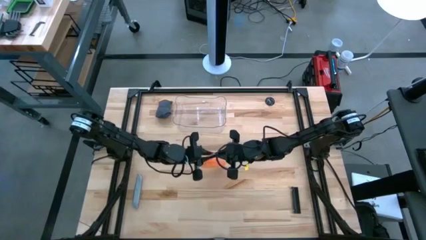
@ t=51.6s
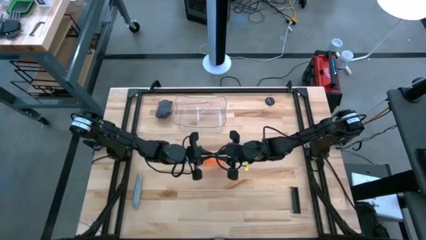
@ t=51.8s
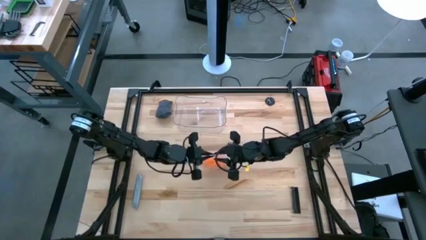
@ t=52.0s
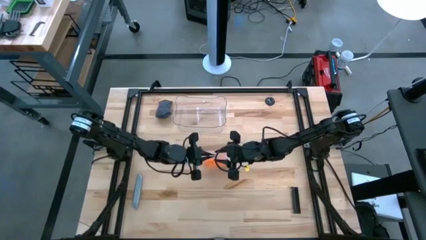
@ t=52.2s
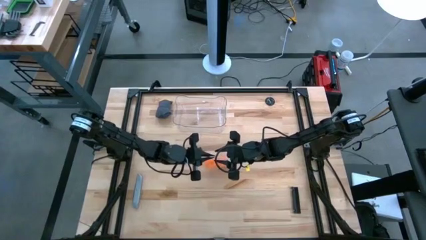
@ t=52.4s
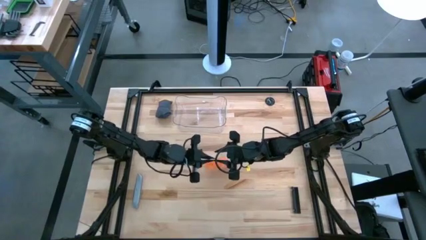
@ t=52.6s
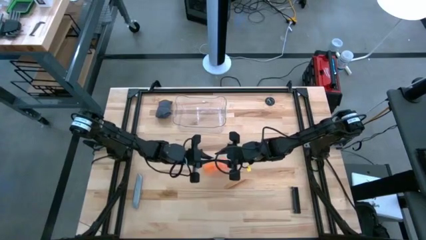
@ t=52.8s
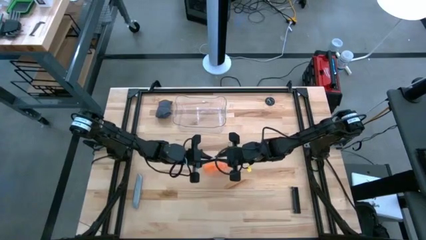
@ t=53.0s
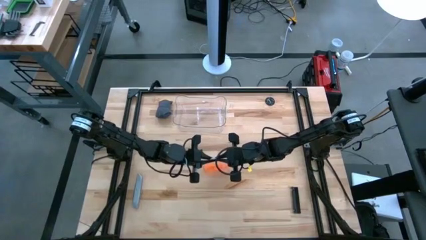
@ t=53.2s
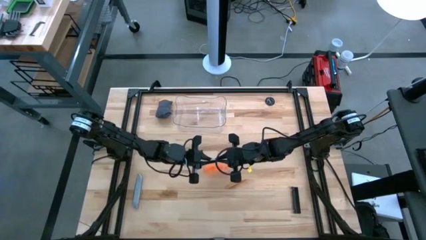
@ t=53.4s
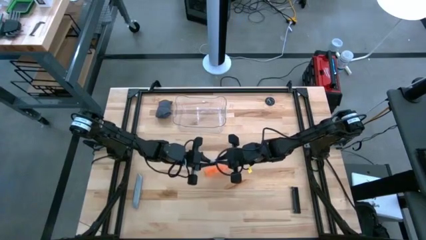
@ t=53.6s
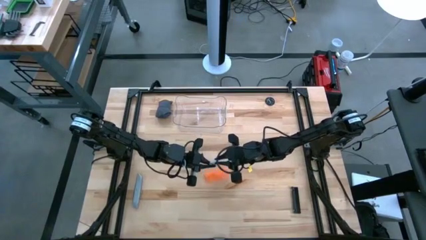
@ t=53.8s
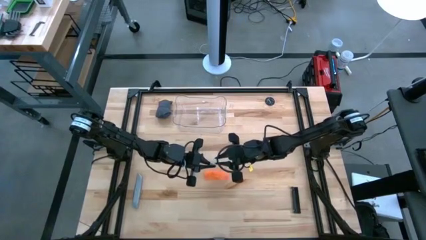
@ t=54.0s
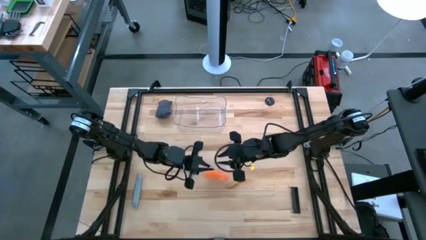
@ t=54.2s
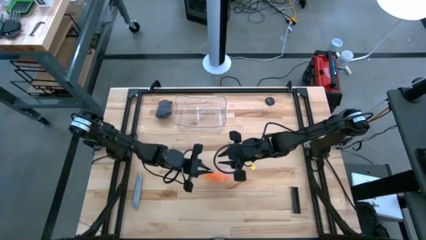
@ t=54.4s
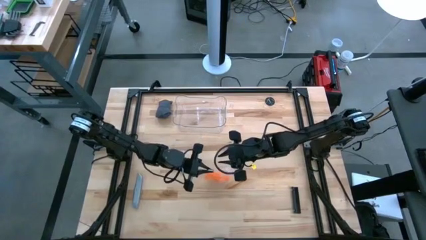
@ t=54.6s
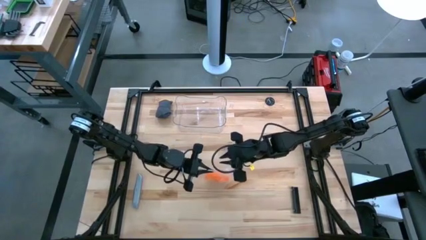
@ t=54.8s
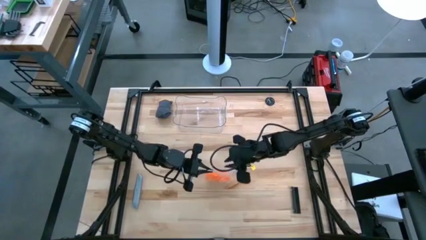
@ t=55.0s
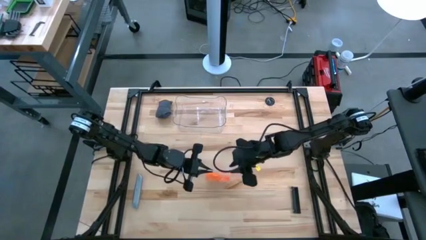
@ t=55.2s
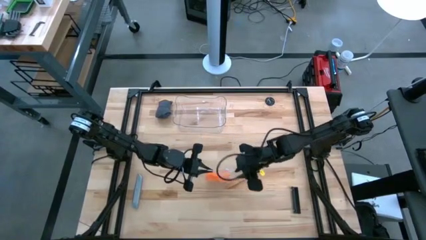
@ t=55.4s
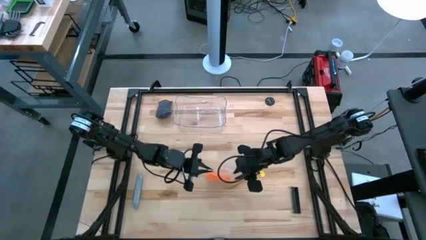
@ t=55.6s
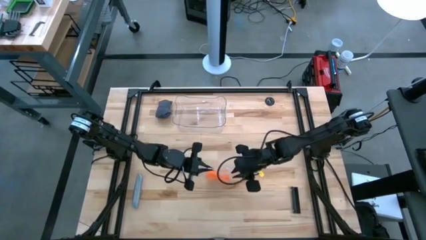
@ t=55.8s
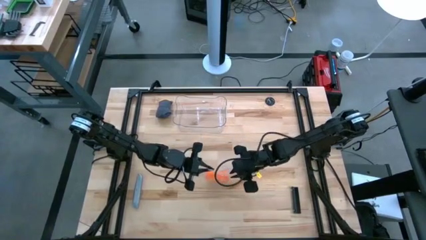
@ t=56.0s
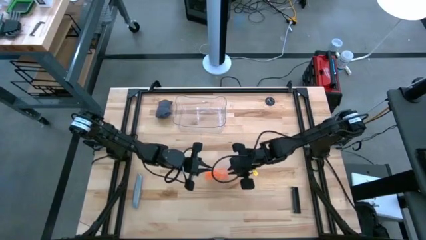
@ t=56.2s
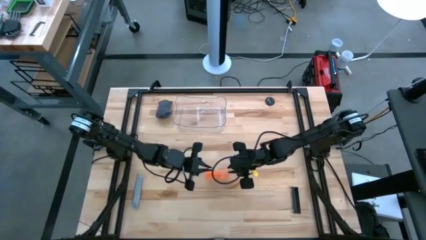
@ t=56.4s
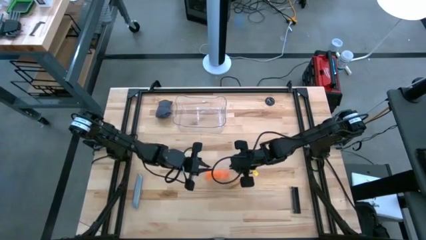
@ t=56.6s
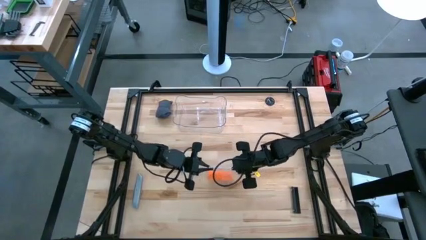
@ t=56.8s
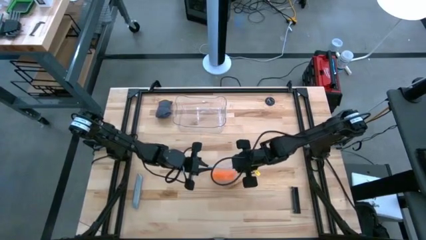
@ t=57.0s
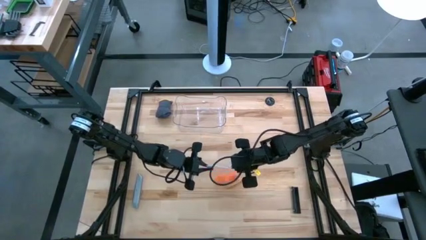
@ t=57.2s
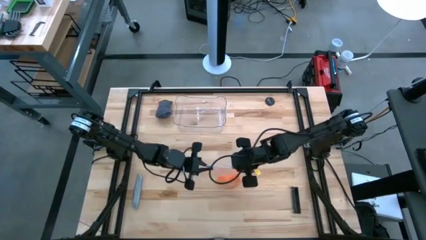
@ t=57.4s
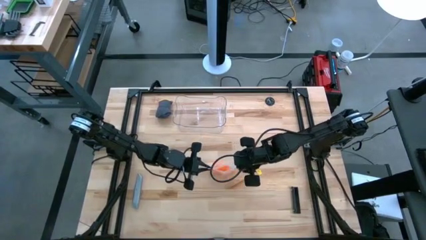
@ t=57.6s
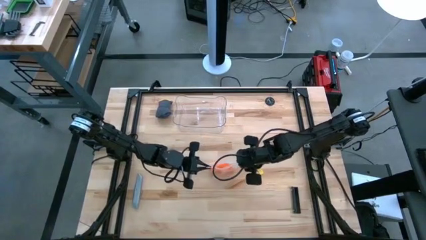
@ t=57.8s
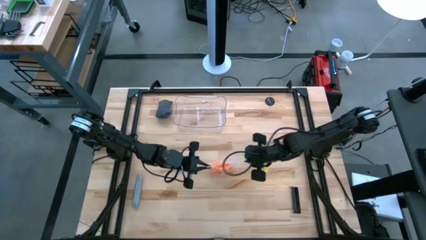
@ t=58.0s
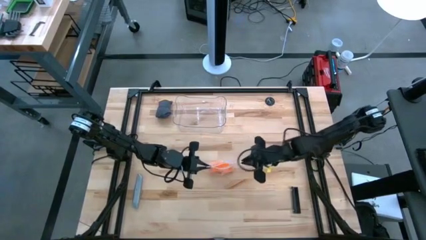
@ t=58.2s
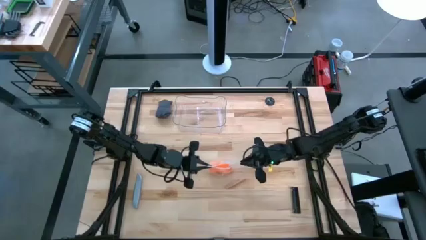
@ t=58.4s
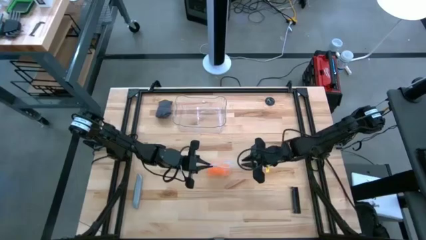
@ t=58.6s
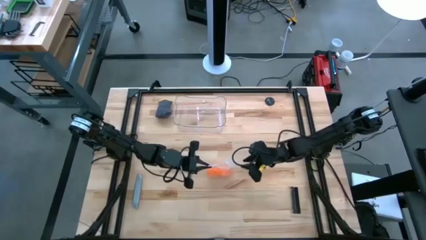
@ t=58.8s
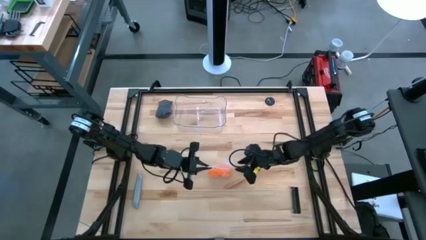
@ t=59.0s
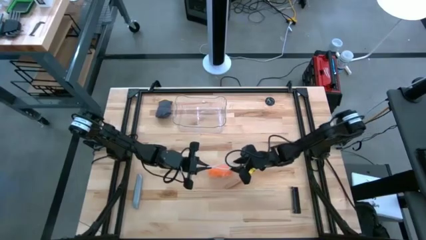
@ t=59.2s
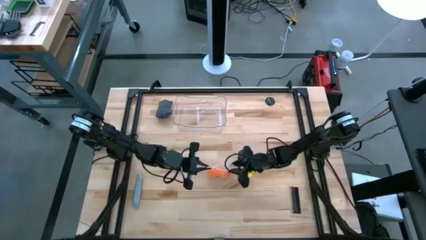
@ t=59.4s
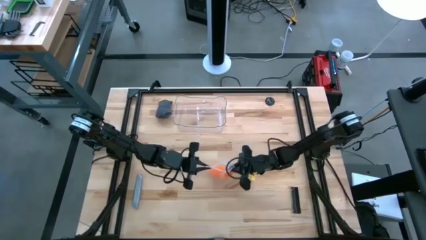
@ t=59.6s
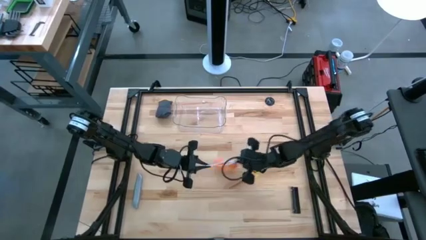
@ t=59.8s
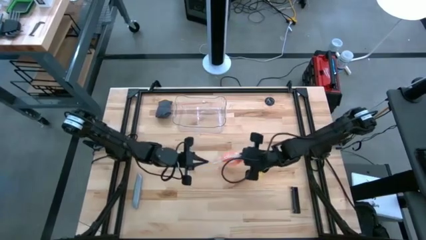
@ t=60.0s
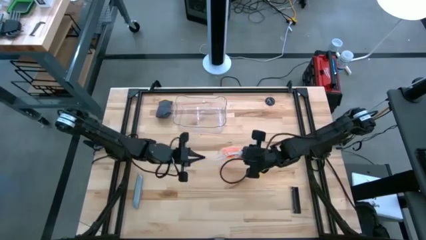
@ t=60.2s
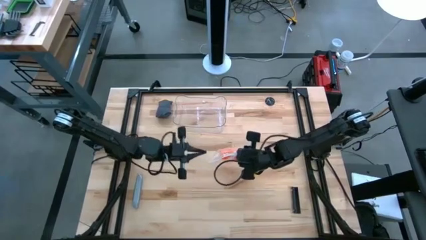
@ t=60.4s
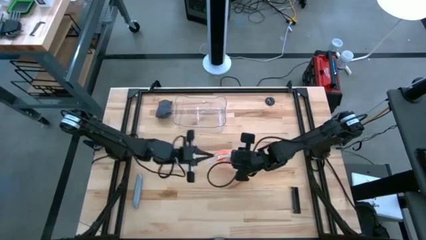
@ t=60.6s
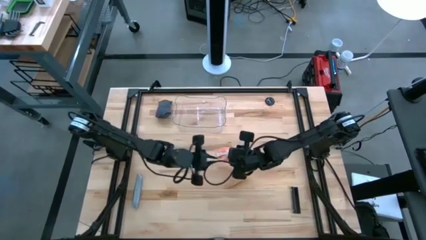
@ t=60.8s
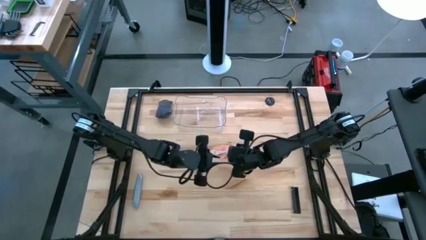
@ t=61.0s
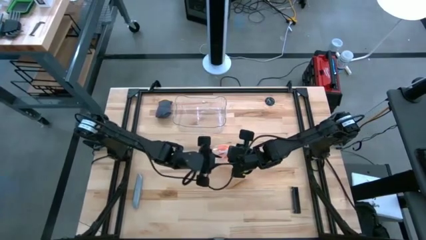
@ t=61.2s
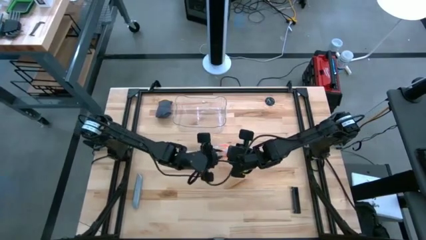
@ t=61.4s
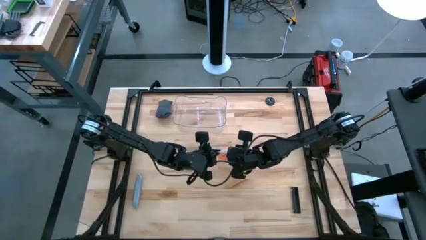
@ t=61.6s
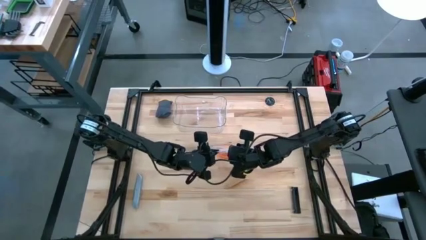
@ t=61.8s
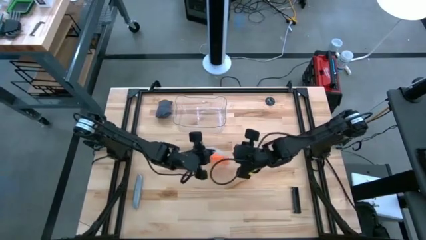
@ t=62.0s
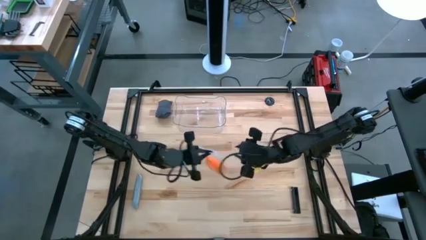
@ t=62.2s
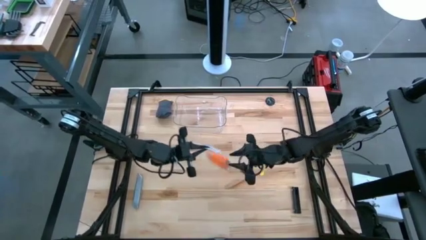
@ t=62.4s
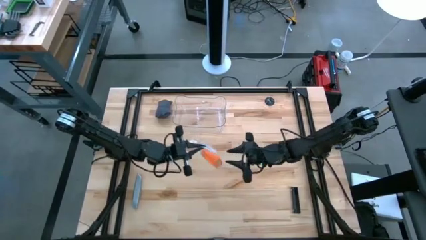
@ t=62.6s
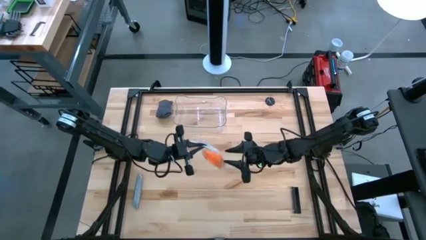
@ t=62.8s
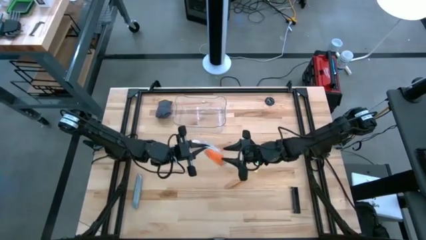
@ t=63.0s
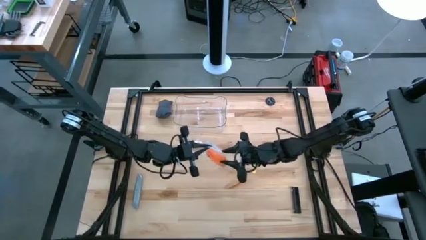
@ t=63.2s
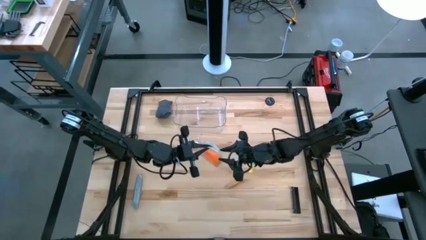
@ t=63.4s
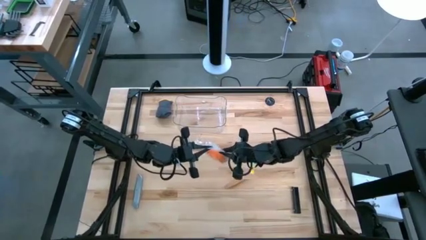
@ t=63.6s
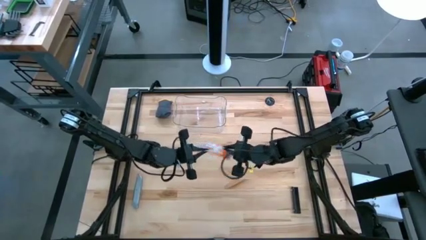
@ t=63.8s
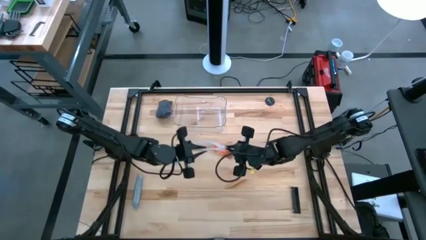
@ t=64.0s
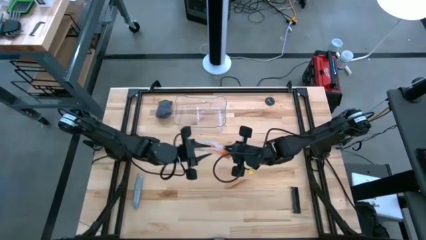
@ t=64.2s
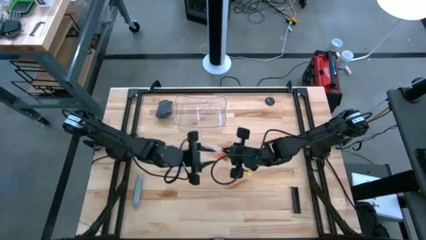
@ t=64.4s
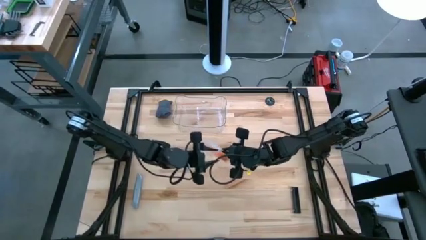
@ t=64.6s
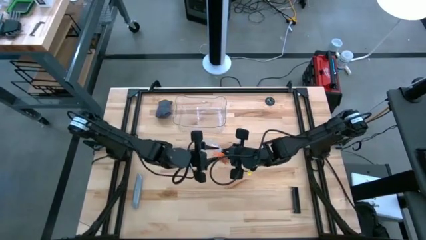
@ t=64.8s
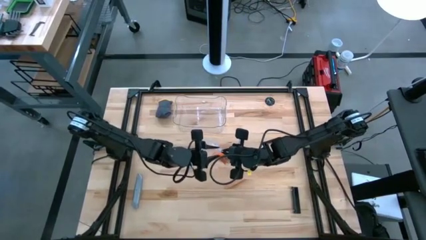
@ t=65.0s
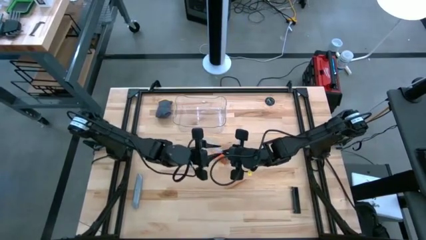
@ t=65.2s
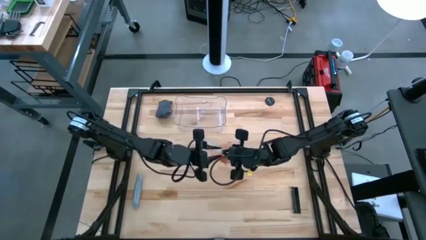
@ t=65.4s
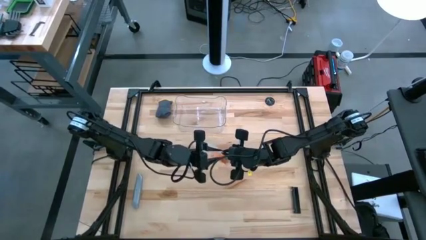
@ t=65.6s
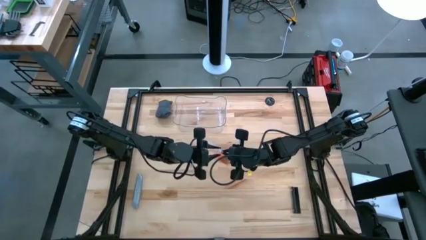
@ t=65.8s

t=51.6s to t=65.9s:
Task: Roll bandage
Close the transparent zip bag
